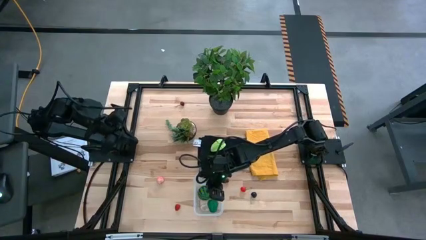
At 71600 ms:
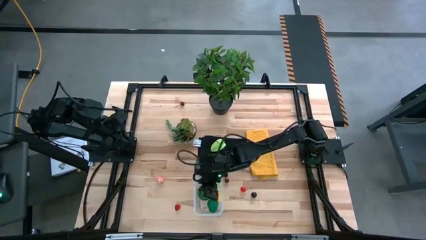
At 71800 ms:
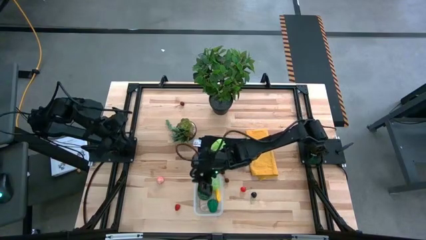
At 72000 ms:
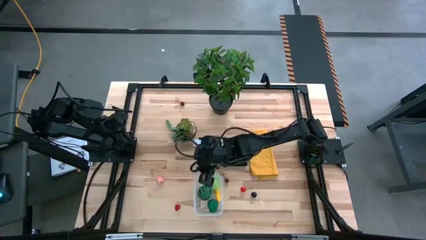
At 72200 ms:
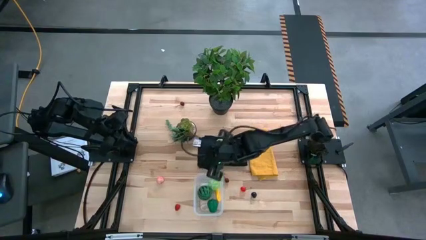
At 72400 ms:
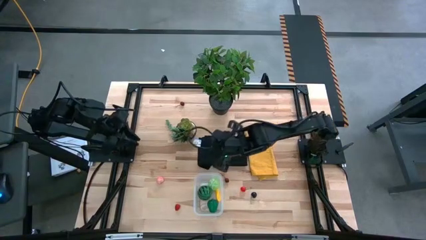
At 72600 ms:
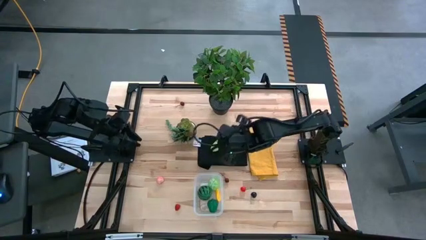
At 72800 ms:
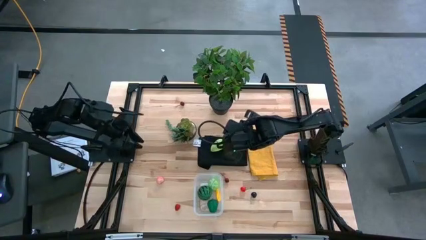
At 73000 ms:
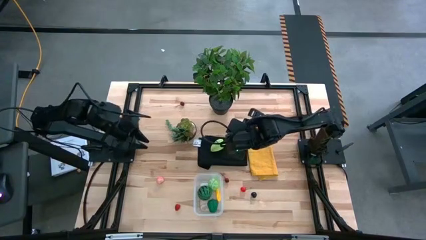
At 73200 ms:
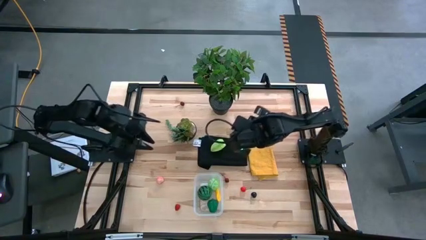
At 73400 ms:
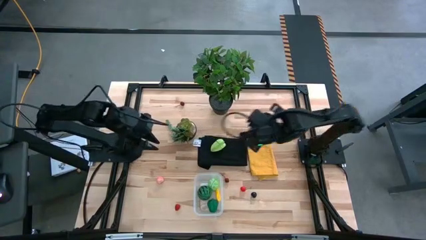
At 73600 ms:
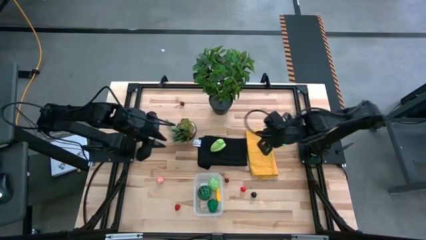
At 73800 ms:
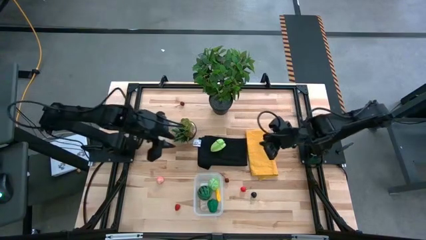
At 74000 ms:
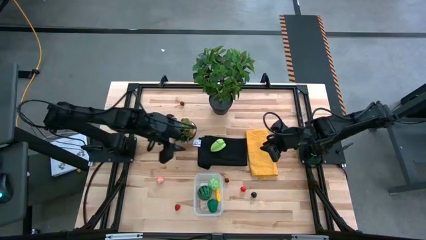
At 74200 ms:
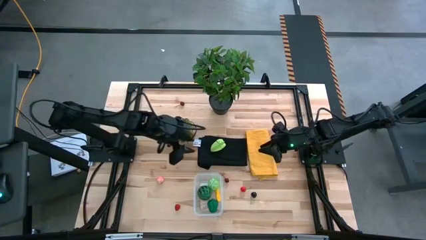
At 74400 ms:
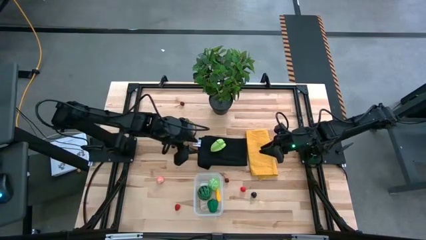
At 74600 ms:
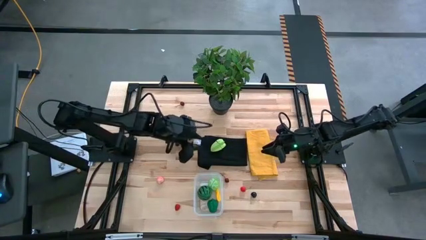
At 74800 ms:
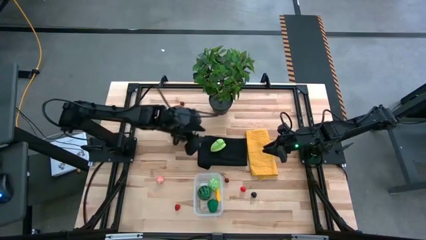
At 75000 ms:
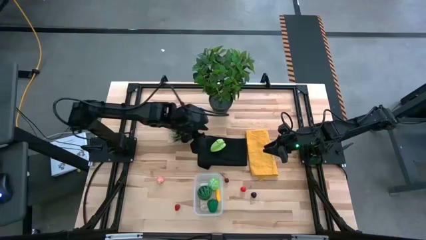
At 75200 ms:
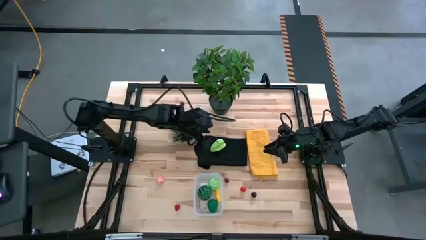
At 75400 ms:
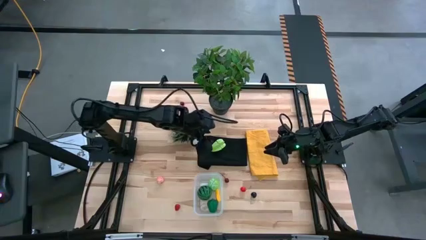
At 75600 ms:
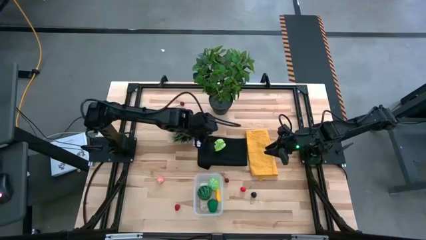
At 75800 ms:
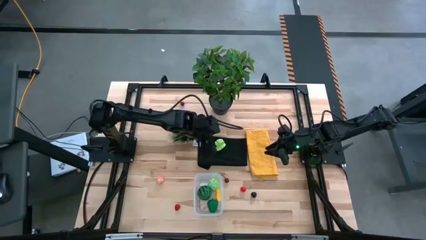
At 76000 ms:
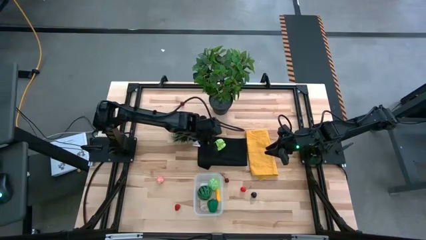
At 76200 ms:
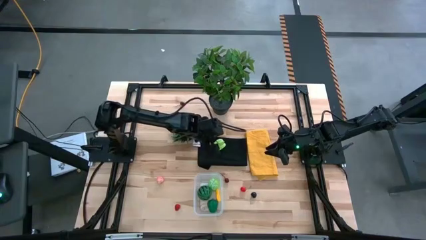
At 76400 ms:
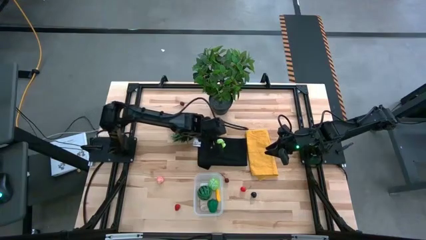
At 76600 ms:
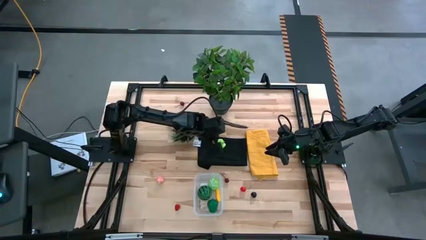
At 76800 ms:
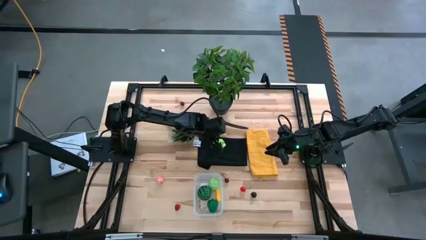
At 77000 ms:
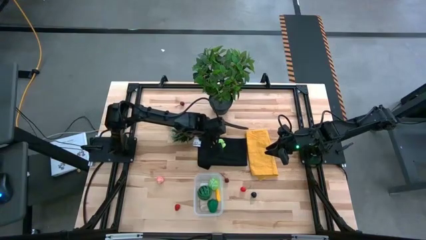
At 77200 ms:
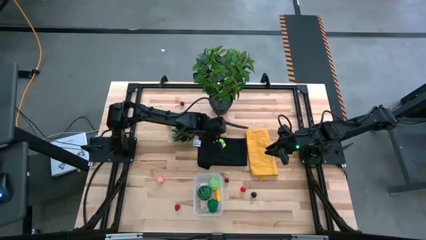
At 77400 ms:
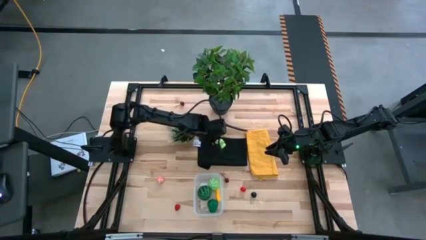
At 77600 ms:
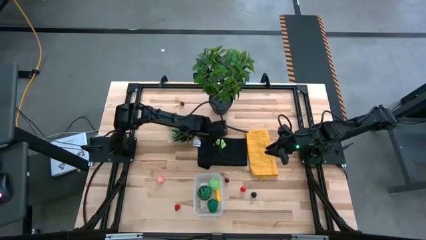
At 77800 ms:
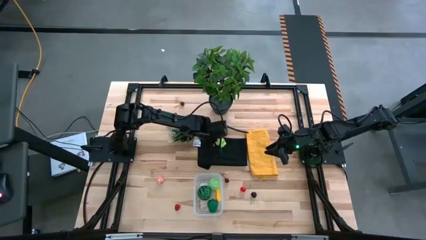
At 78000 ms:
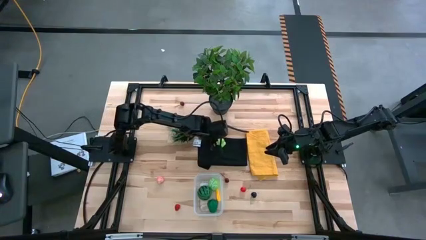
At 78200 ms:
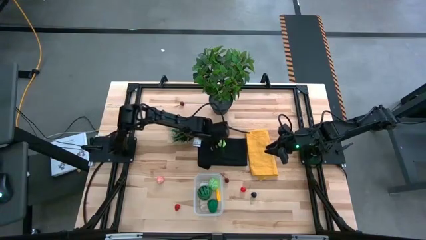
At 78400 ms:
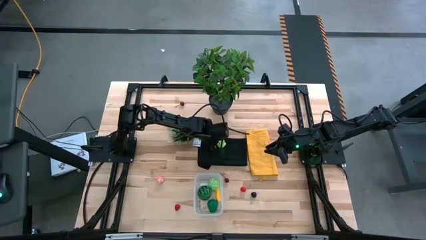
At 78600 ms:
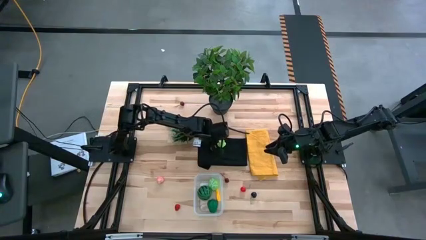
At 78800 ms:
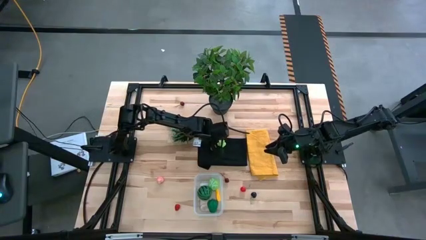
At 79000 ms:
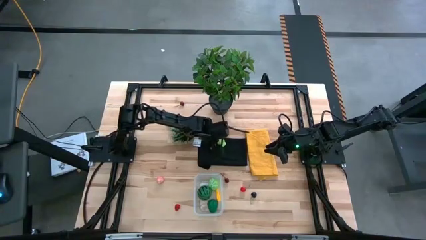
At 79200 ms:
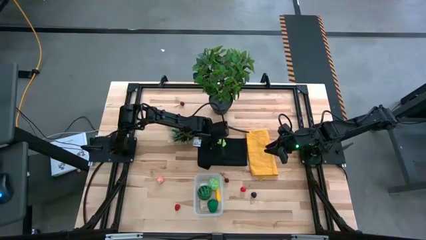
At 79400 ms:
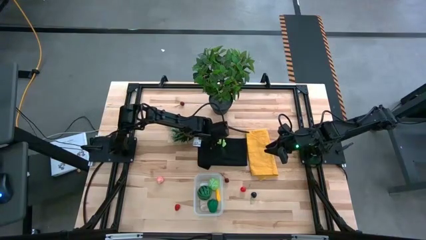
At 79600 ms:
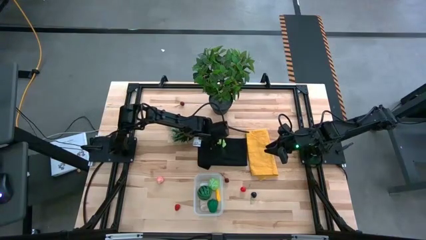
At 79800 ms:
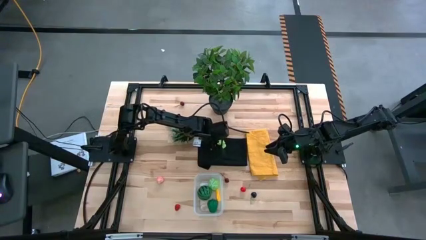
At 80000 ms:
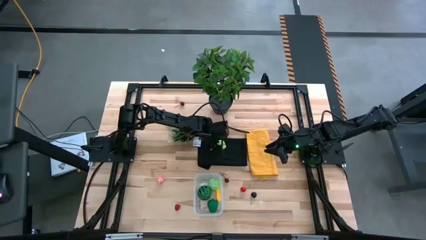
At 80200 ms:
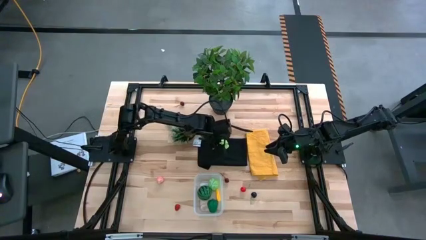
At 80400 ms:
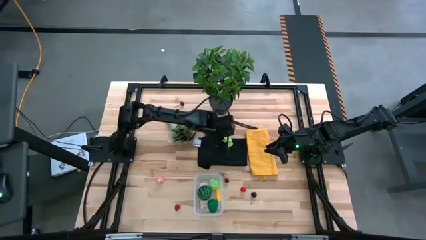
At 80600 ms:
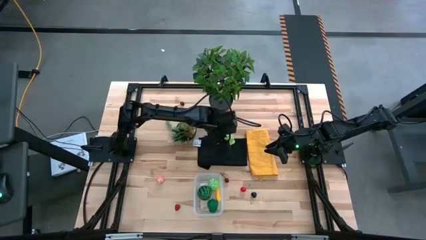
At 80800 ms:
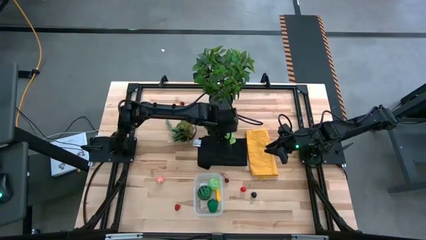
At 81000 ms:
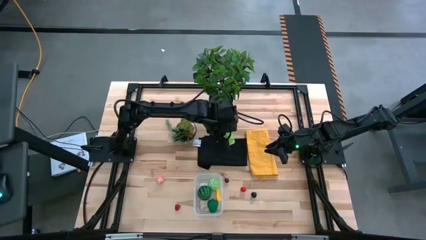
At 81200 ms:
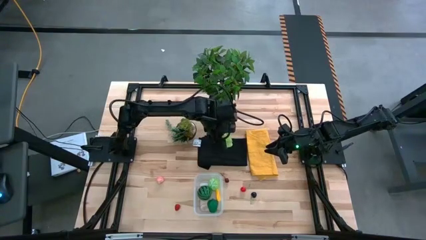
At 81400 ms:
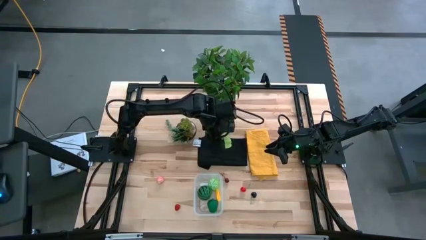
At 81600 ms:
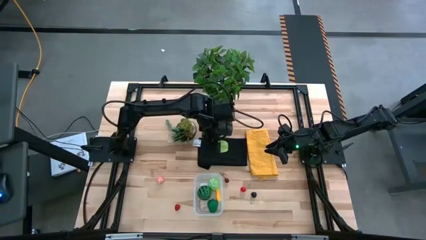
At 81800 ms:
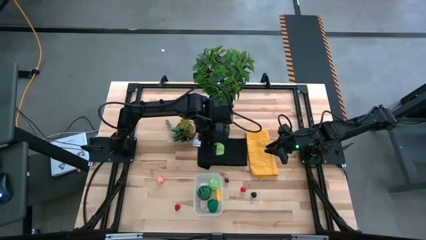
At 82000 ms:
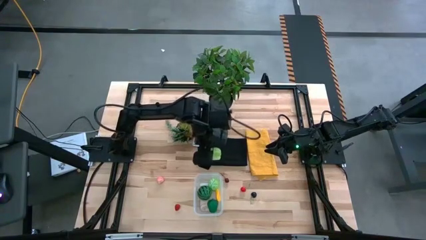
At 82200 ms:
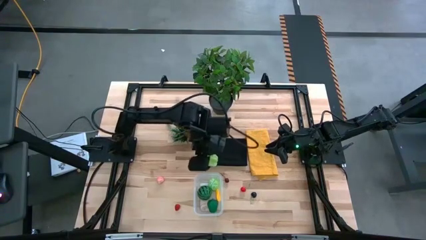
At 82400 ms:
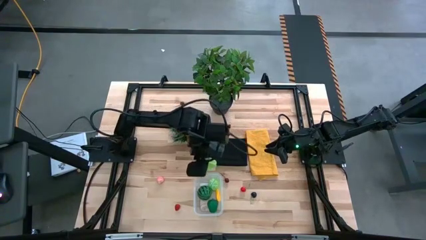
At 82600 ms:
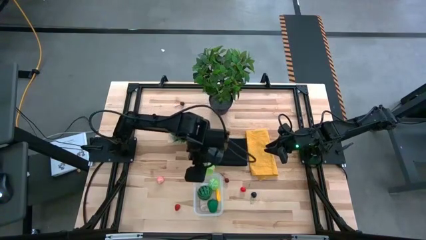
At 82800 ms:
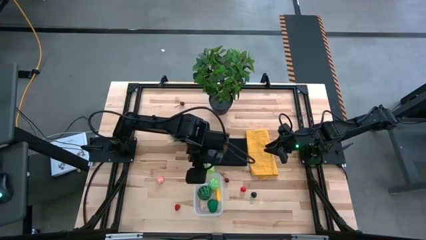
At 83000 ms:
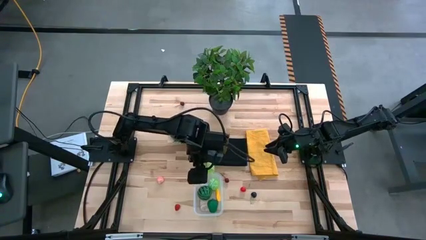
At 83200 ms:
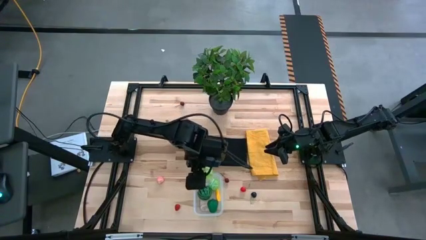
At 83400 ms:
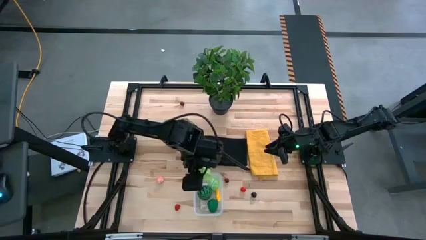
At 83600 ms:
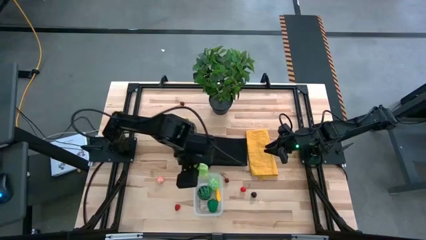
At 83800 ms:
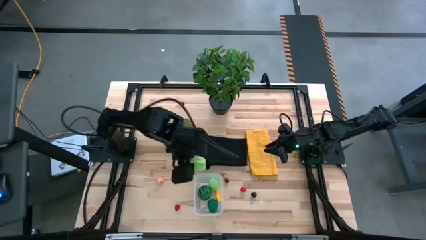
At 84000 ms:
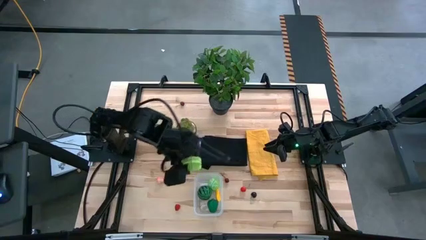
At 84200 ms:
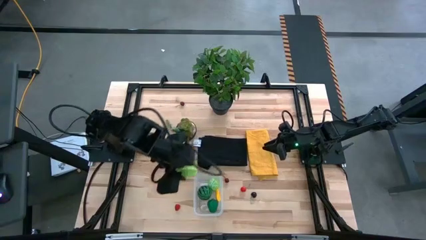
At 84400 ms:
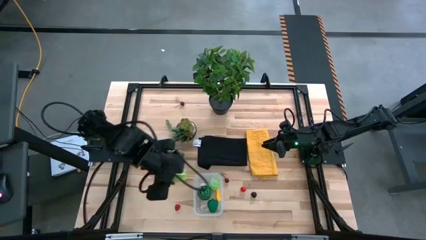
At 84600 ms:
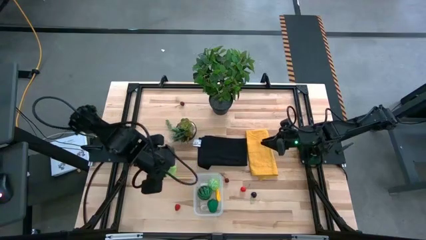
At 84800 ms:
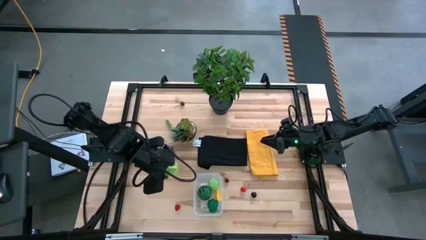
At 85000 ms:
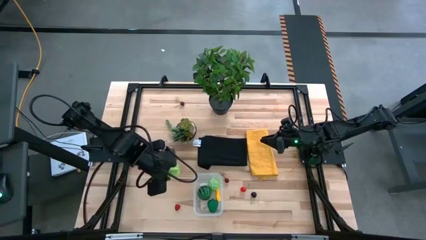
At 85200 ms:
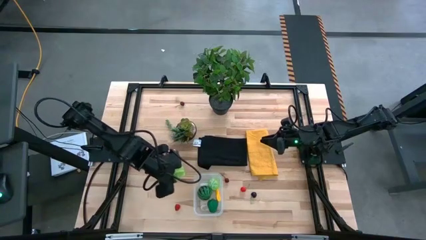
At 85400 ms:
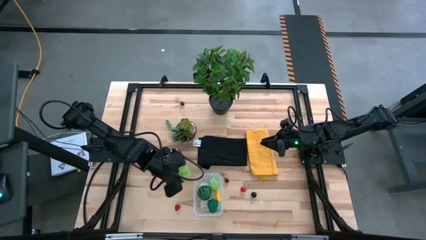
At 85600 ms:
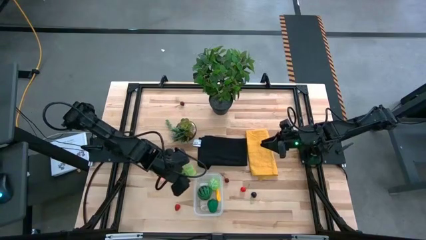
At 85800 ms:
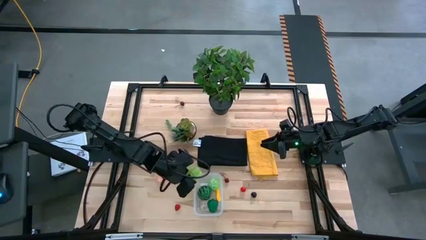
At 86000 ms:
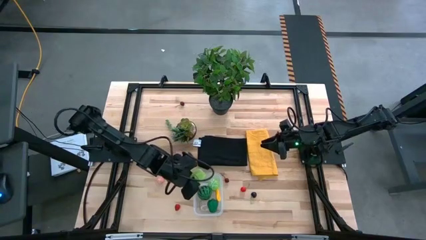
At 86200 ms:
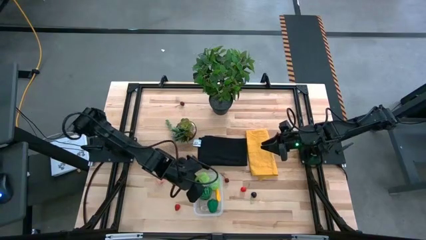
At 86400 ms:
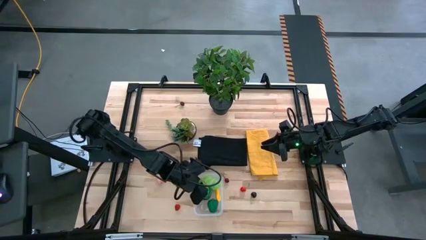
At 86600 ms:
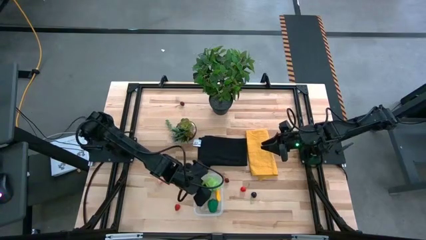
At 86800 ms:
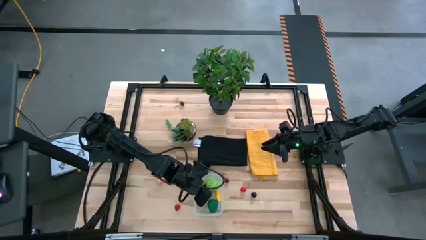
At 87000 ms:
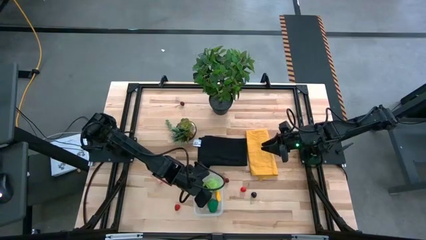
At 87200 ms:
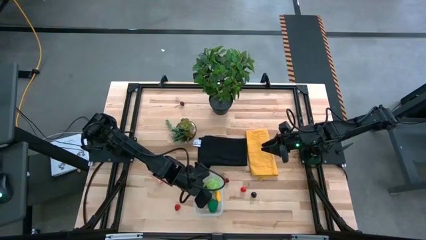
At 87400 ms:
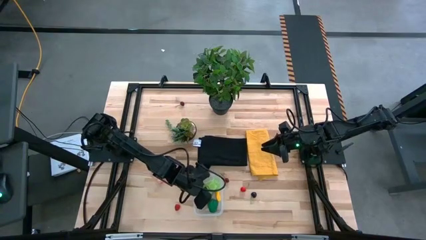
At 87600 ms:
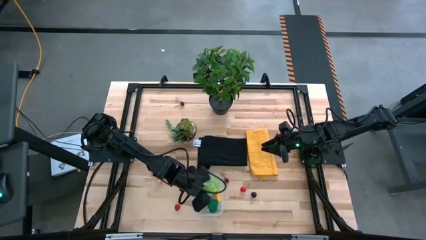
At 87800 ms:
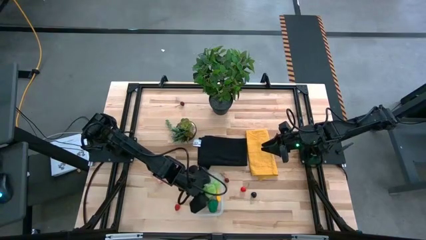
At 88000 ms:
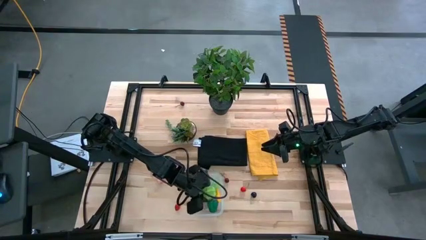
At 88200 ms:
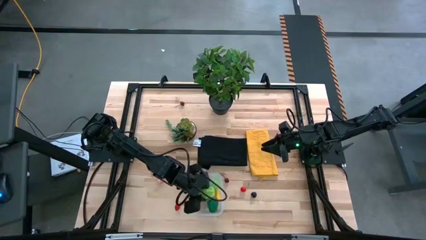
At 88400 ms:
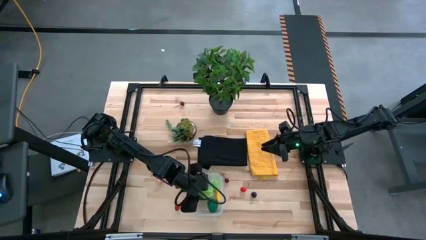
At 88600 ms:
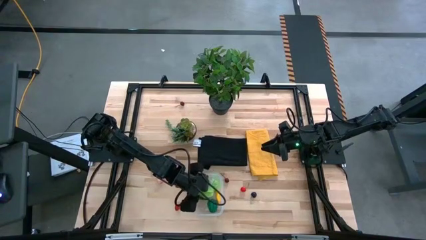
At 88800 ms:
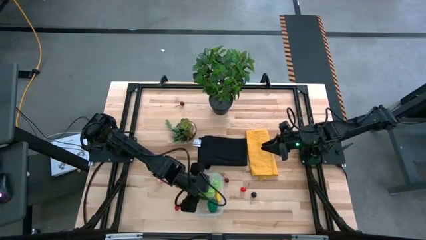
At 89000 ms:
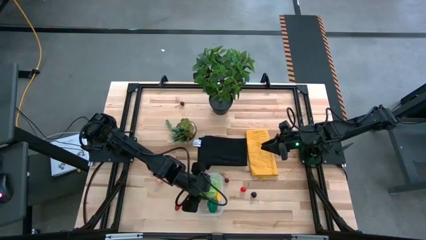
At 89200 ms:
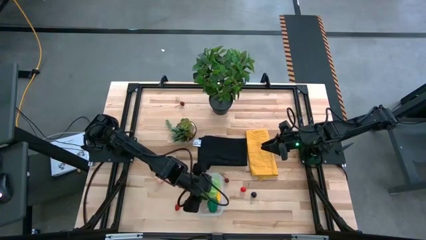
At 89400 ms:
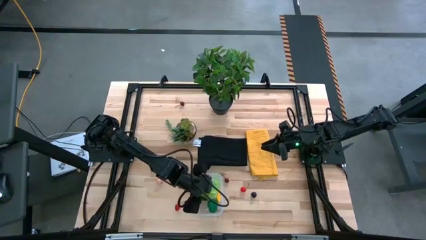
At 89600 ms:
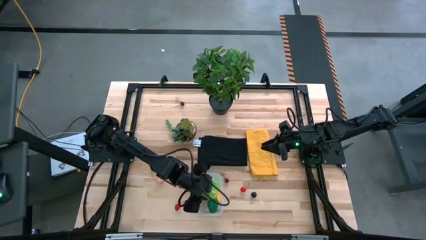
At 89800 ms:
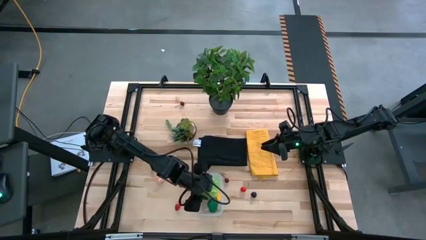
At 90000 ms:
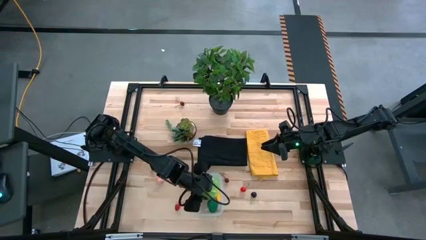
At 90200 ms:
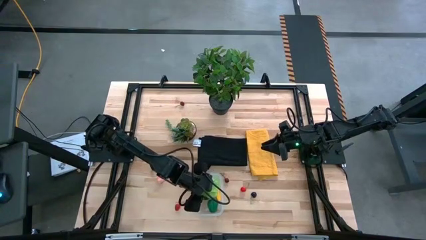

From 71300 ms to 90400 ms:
Task: Pick and placing Produce into tupperware
Put the starfruit into the bin
